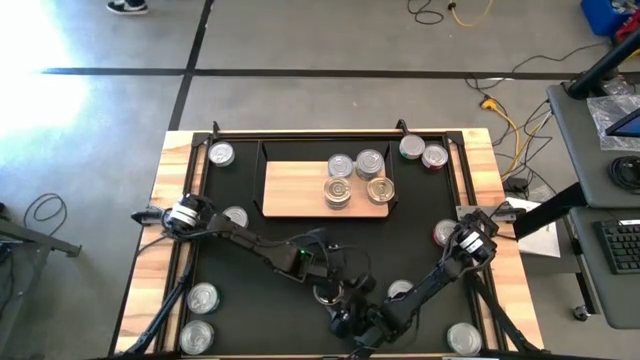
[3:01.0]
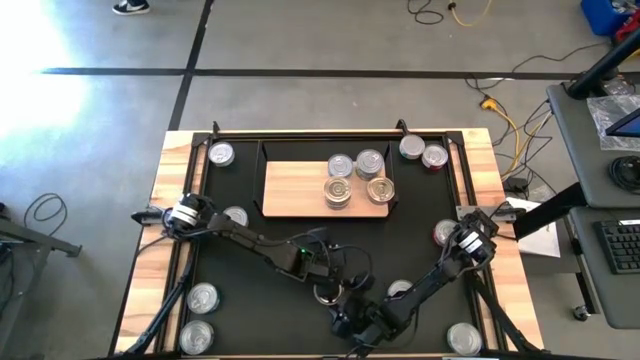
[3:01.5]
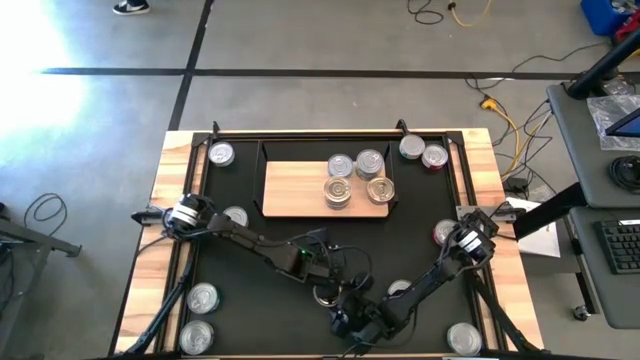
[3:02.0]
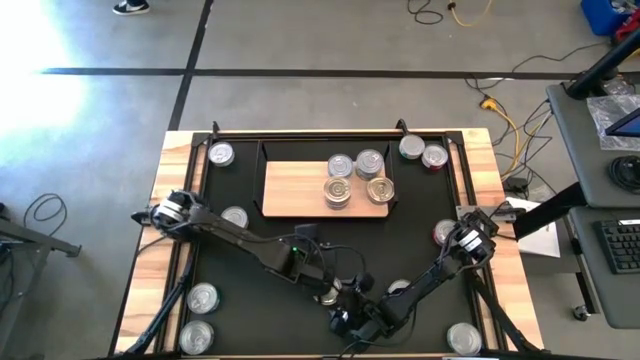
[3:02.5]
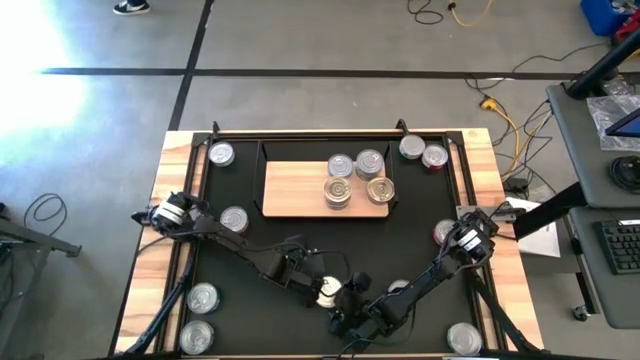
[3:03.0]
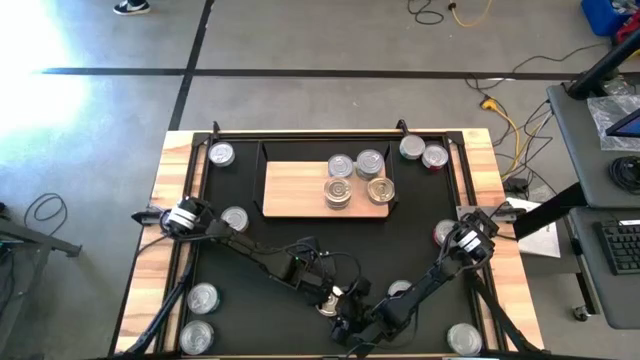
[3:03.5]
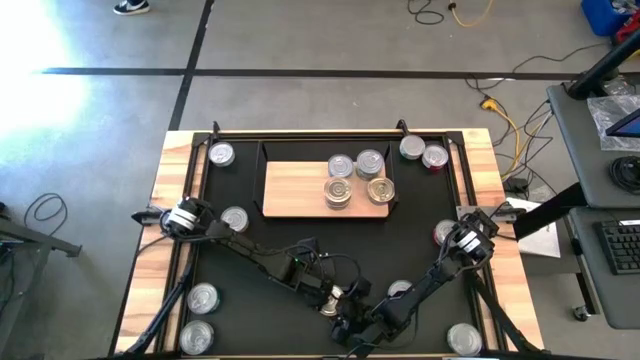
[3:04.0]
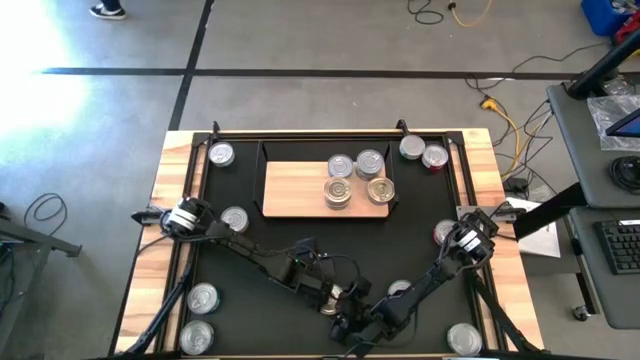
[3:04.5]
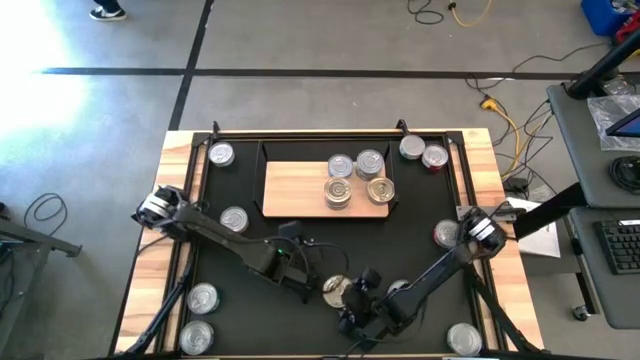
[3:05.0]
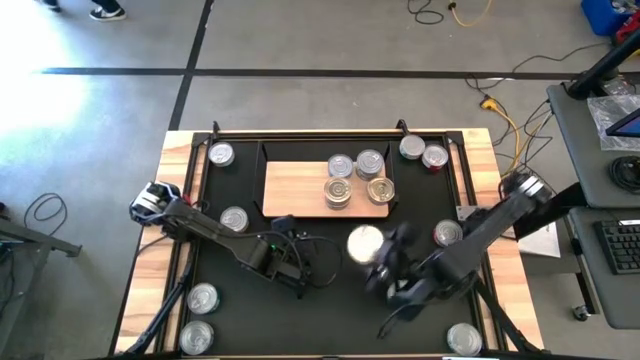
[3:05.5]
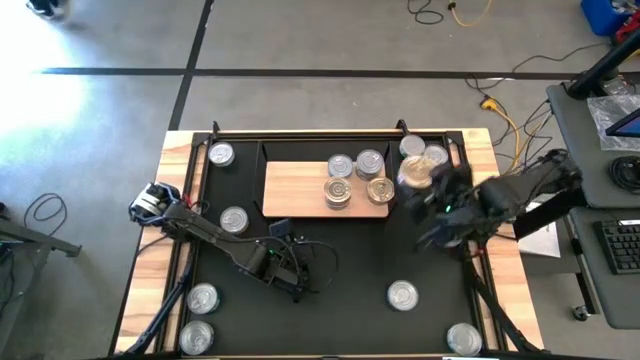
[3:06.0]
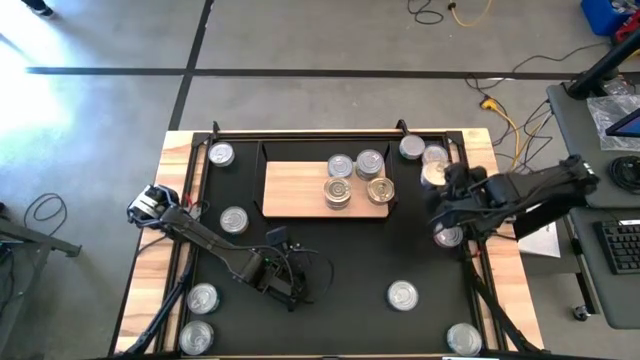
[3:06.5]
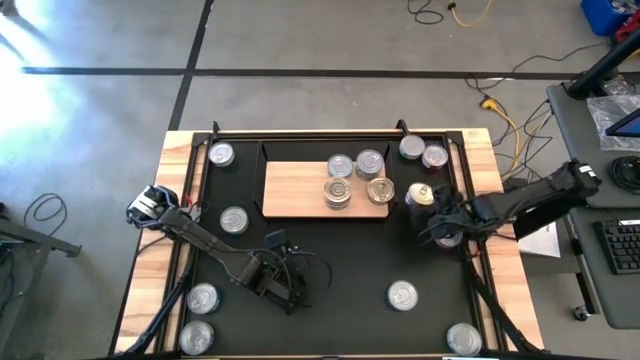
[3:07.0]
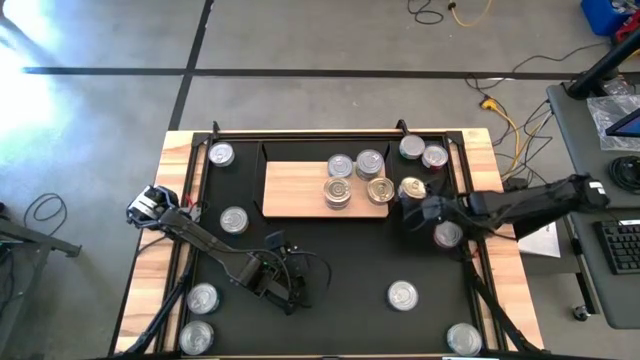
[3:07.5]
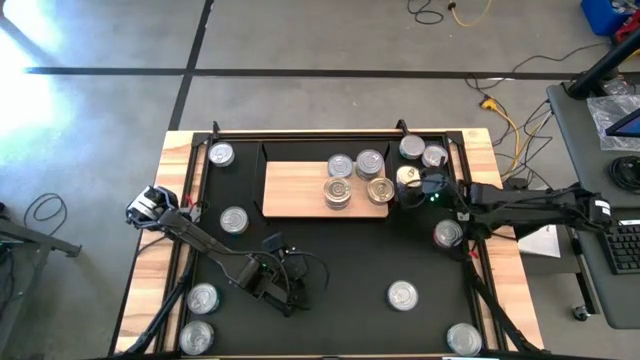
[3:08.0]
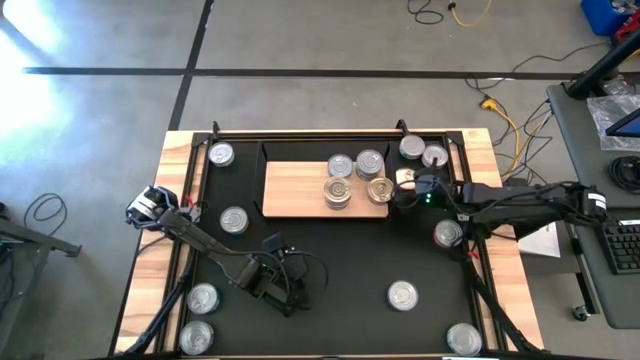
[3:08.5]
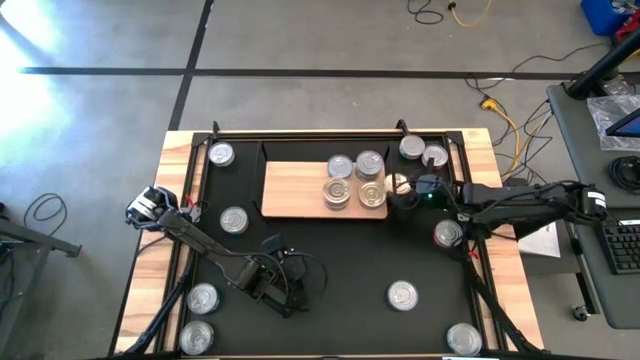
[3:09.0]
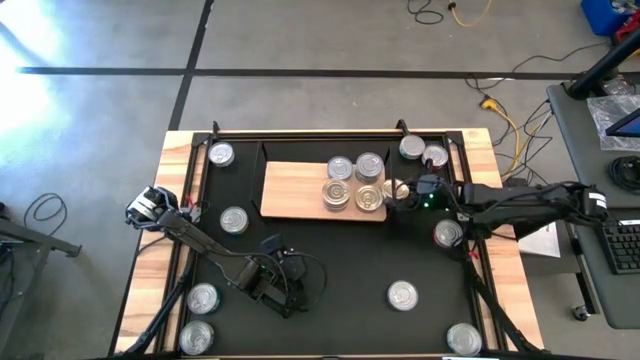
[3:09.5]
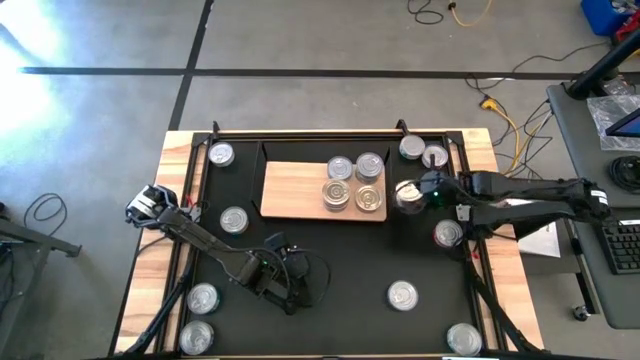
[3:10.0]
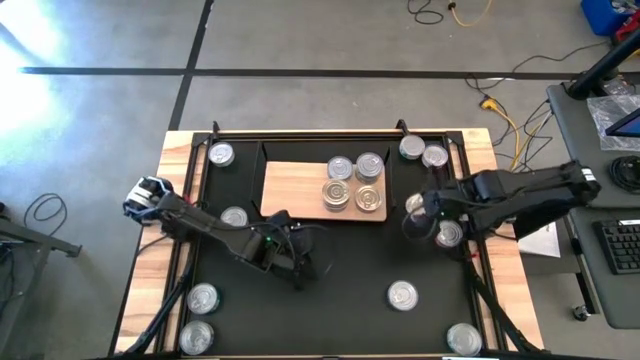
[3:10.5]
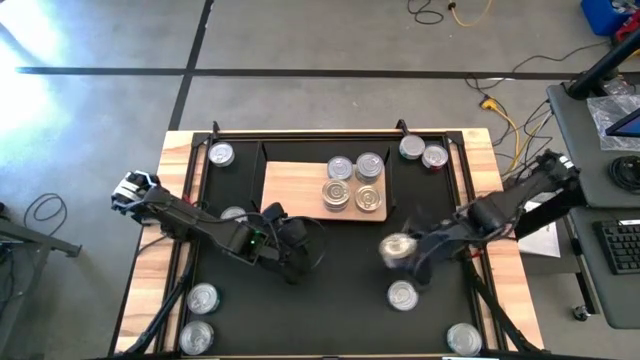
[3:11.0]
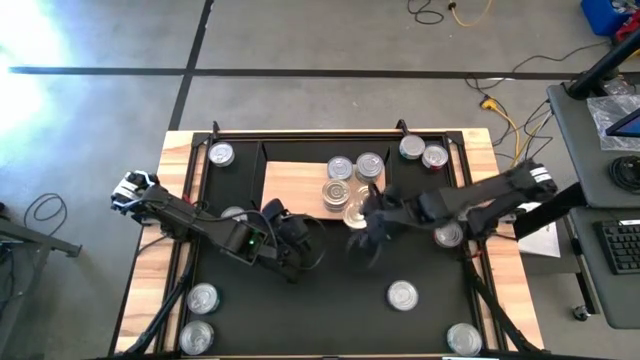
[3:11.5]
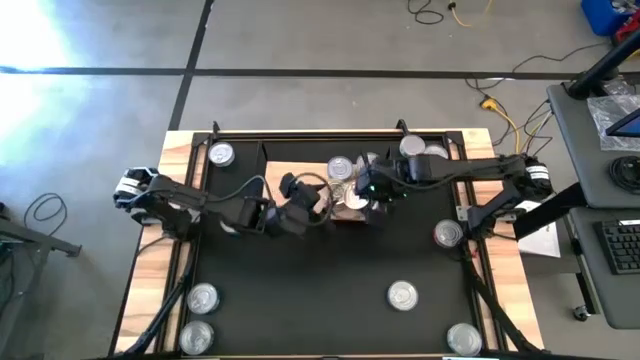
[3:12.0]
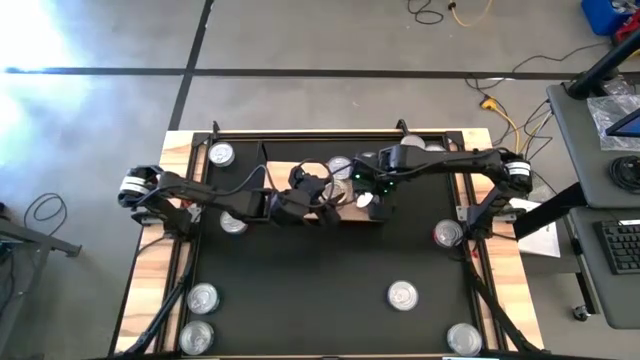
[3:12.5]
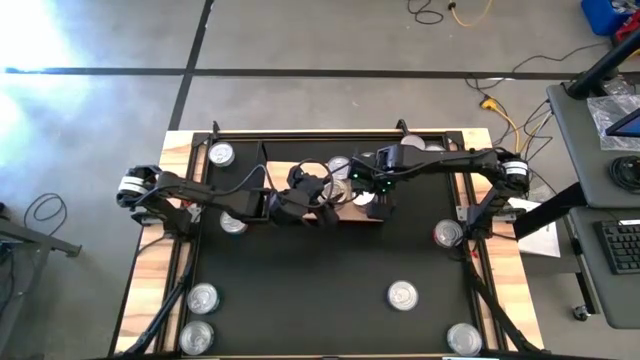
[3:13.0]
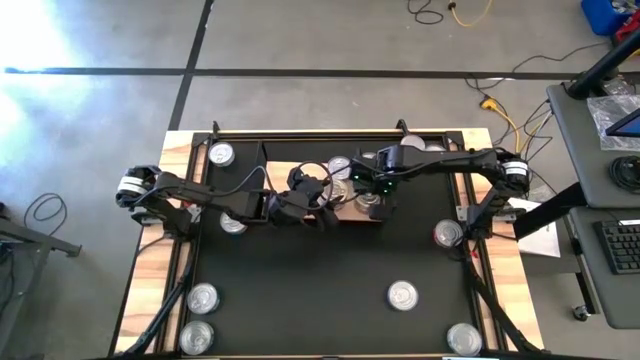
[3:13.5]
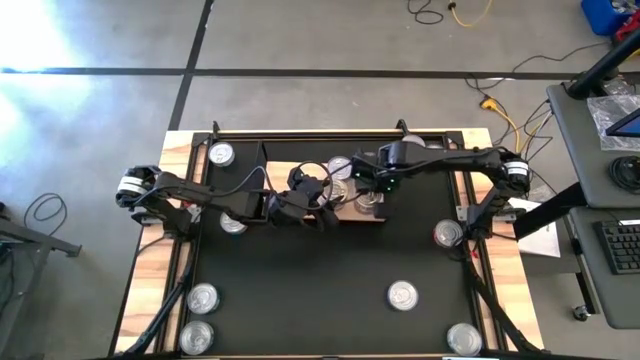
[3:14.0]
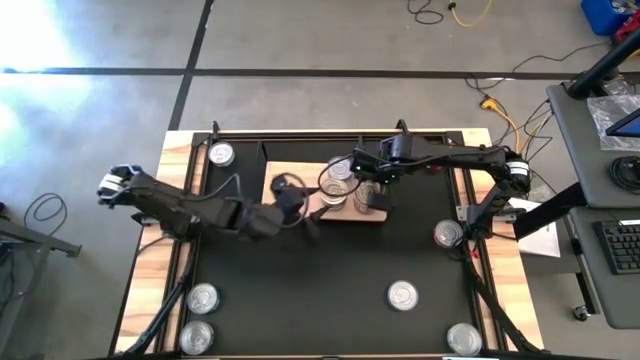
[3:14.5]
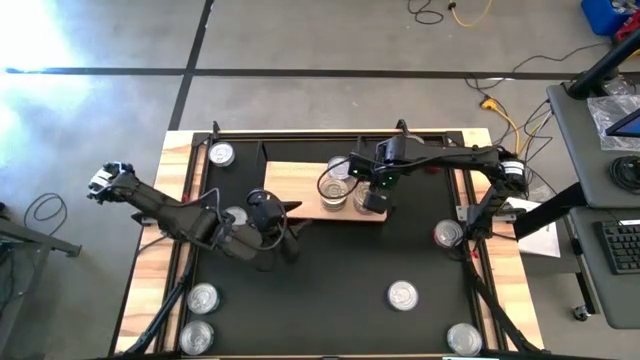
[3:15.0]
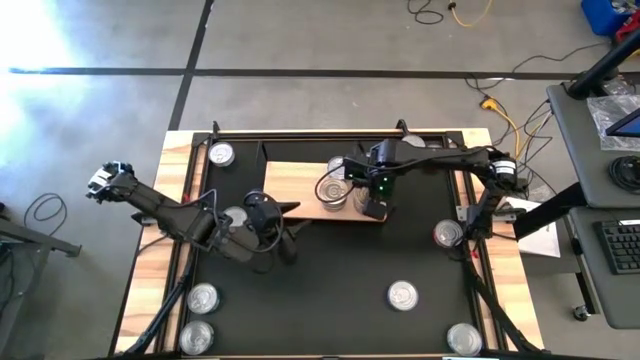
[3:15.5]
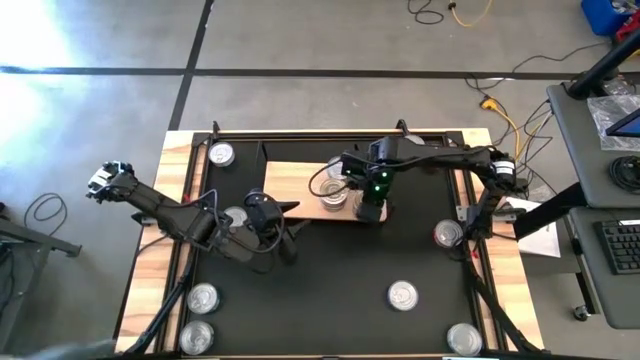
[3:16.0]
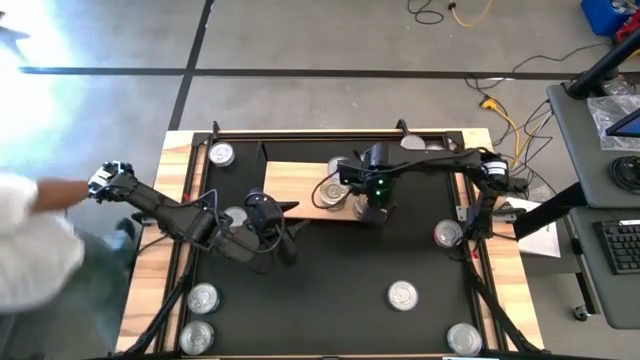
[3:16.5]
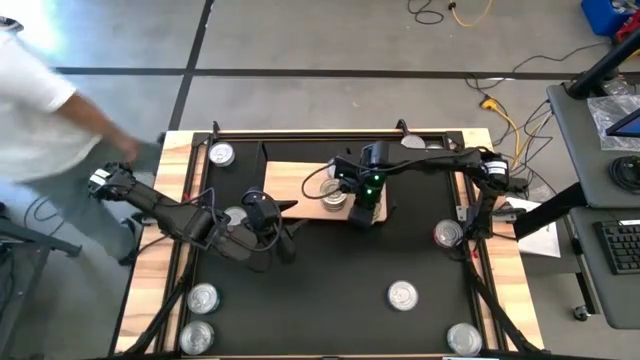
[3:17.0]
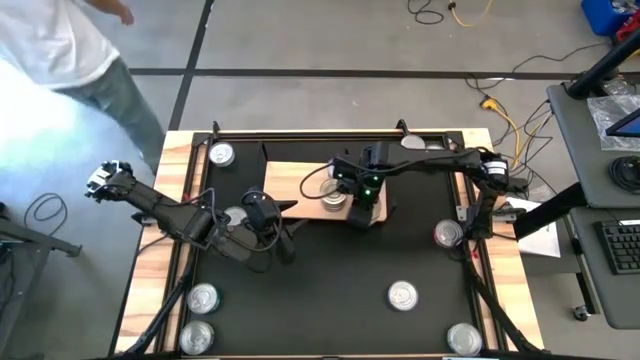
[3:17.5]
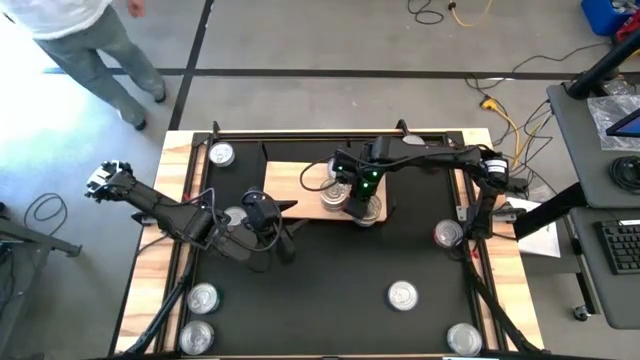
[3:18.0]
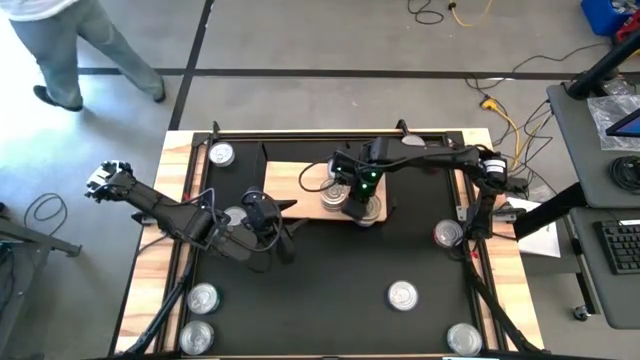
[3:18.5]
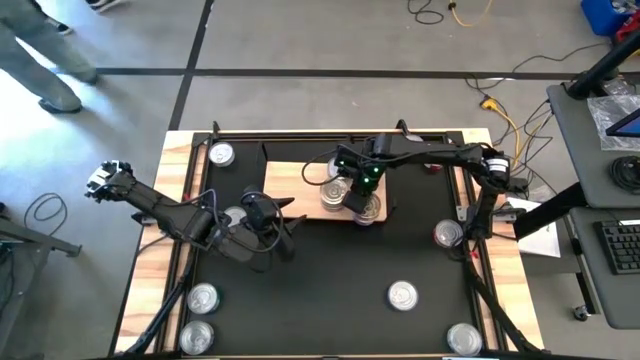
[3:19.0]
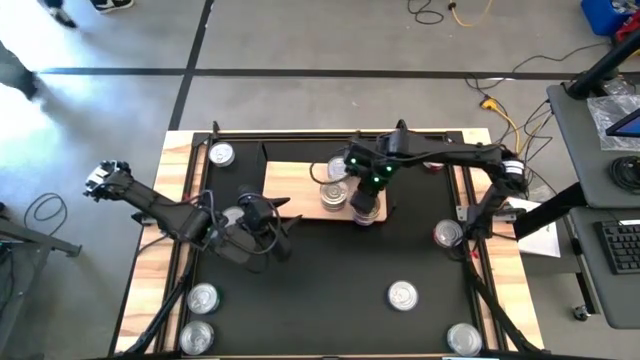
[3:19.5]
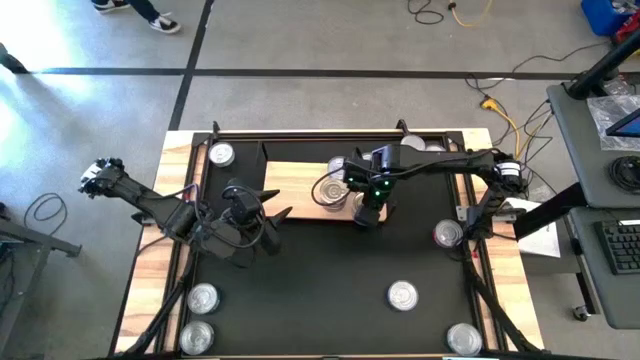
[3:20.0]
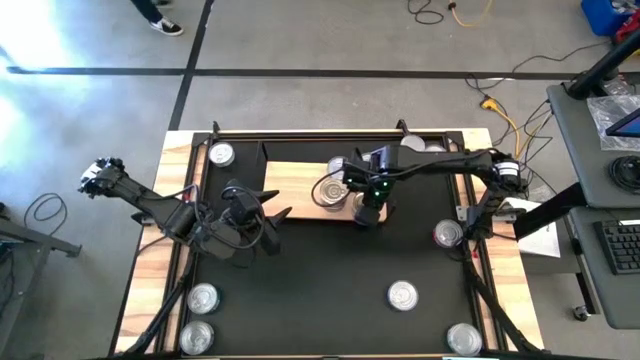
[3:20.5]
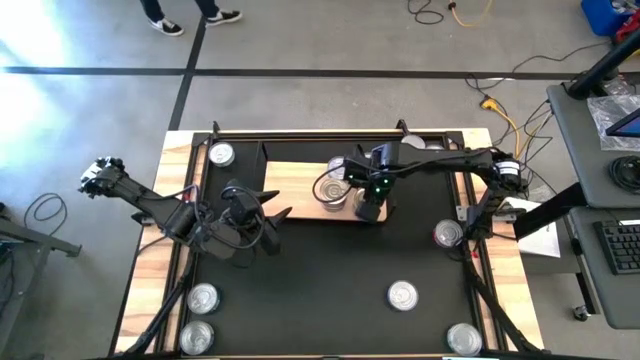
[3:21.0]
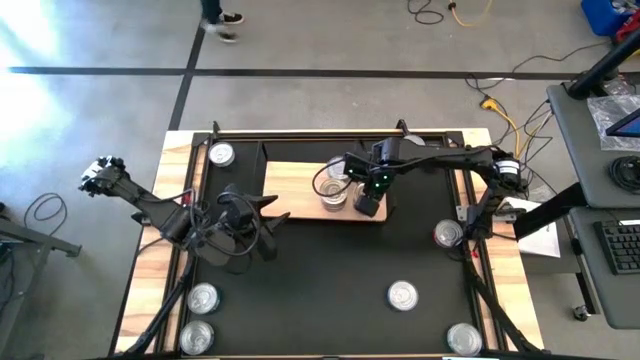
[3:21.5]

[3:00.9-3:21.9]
Task: Stack canned seafood by type on shelf
Stack the blue and orange tuna can on the right blue and orange tuna can

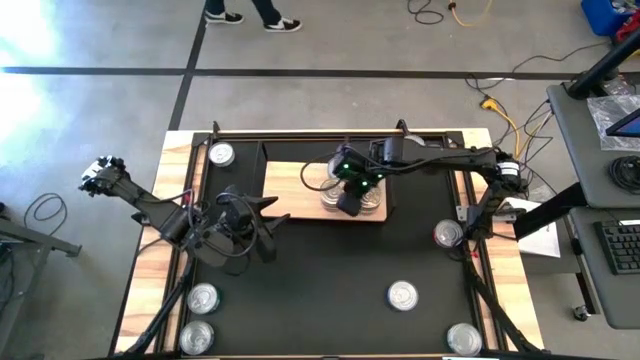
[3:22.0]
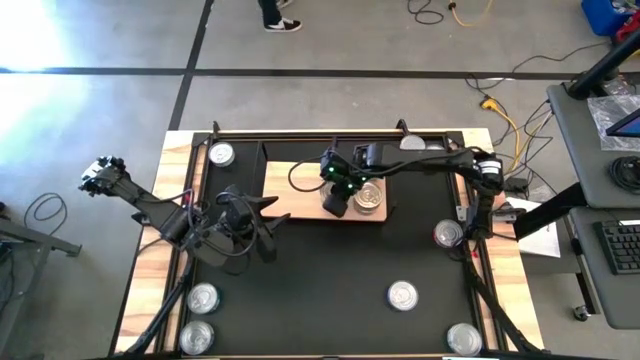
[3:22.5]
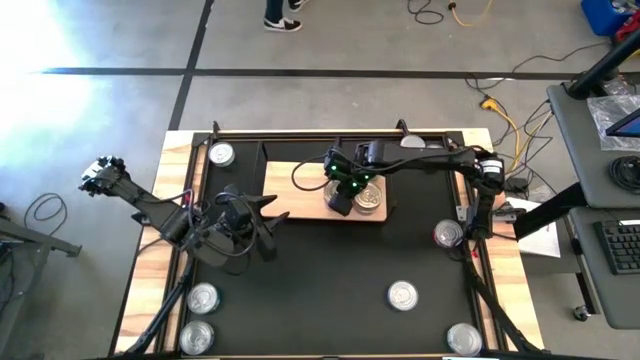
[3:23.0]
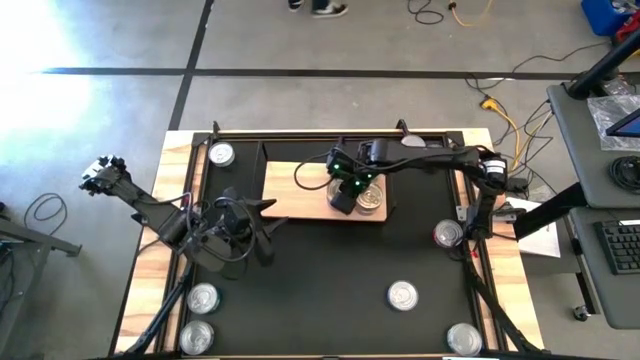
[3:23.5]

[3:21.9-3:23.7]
Adjust the left stack of blue and orange tuna cans
